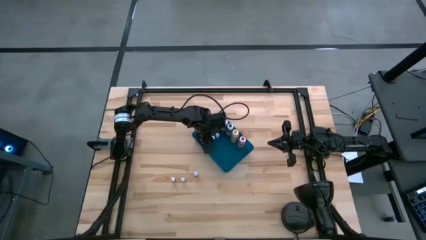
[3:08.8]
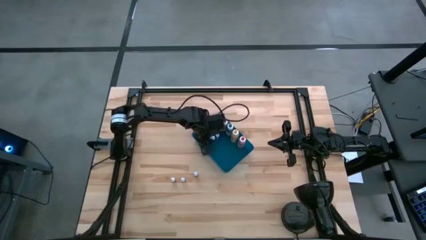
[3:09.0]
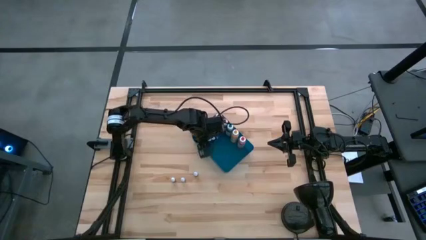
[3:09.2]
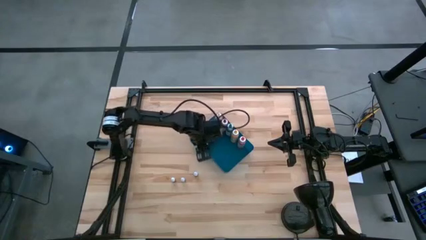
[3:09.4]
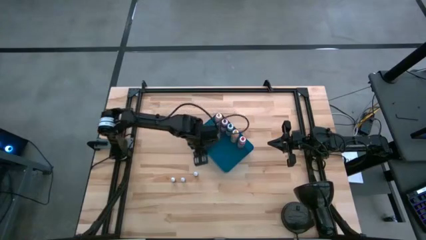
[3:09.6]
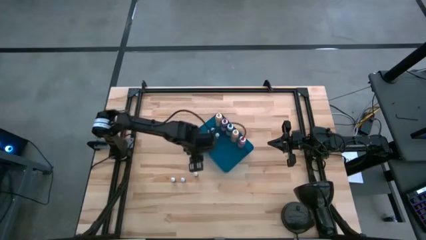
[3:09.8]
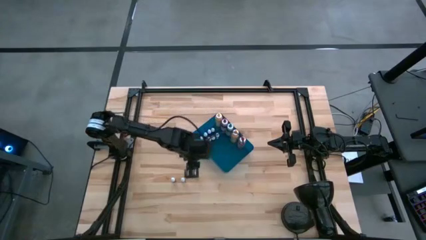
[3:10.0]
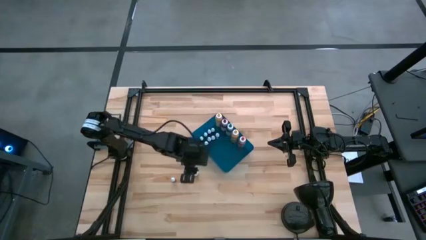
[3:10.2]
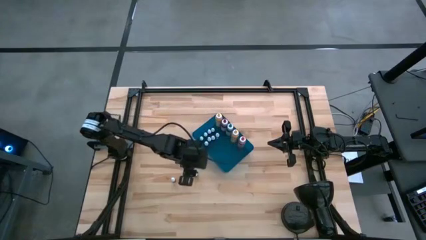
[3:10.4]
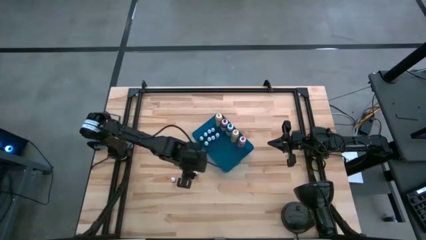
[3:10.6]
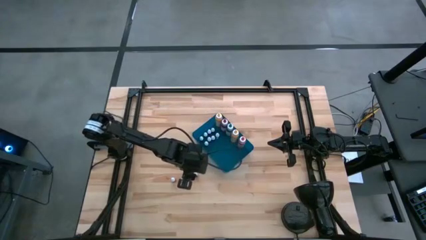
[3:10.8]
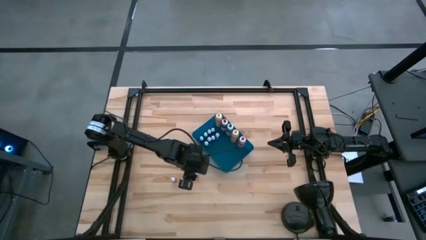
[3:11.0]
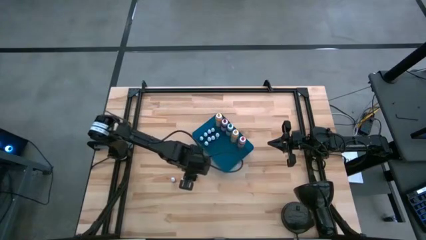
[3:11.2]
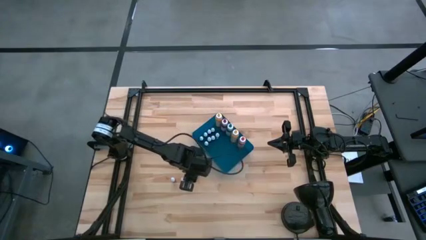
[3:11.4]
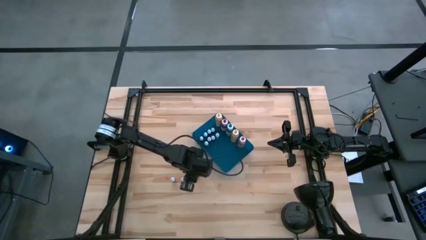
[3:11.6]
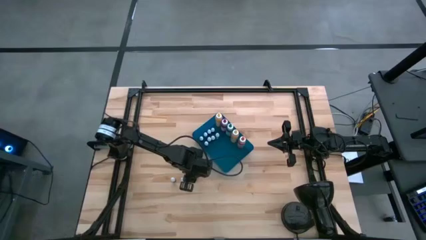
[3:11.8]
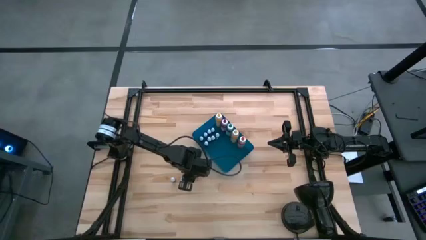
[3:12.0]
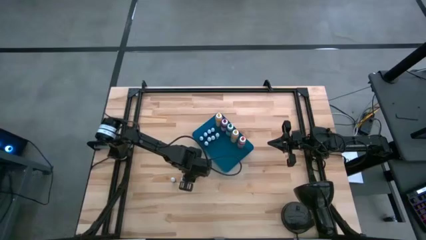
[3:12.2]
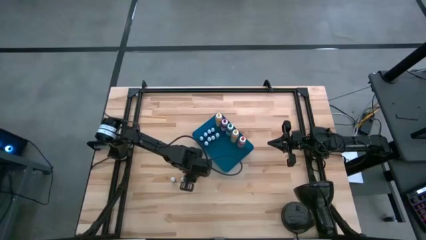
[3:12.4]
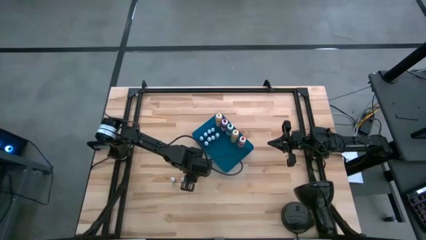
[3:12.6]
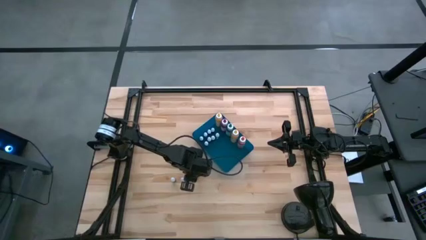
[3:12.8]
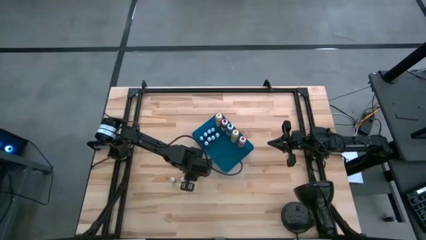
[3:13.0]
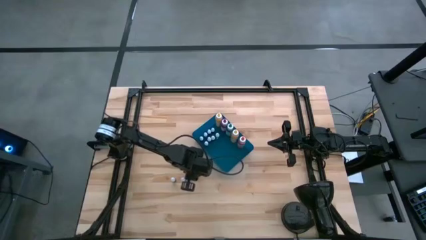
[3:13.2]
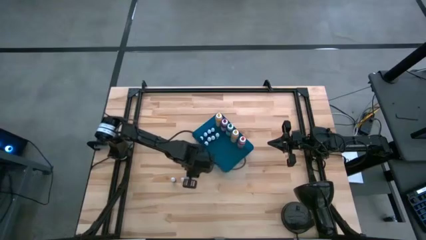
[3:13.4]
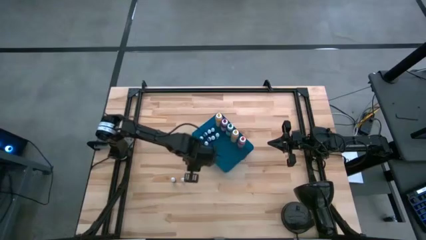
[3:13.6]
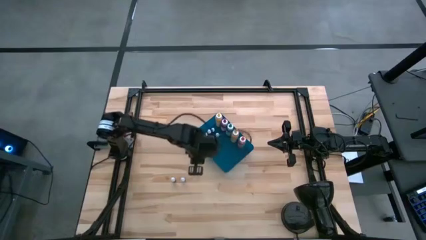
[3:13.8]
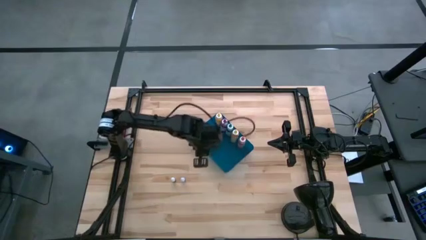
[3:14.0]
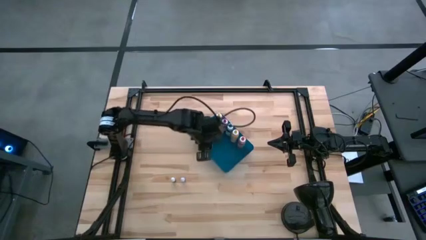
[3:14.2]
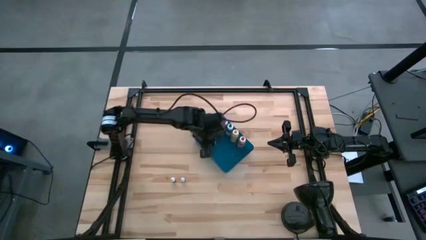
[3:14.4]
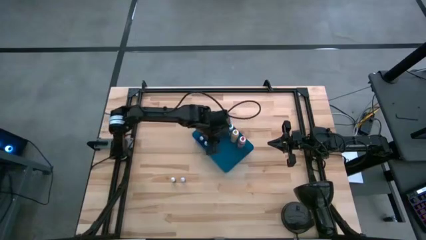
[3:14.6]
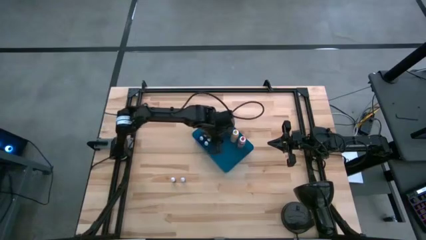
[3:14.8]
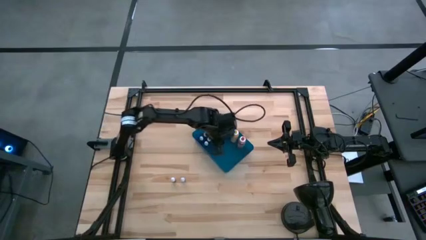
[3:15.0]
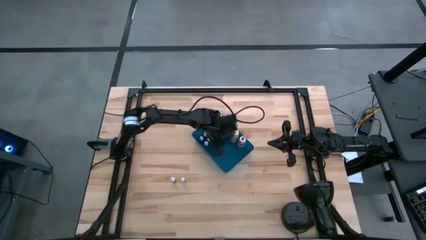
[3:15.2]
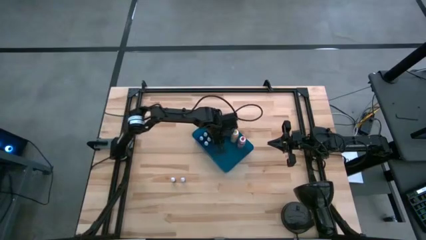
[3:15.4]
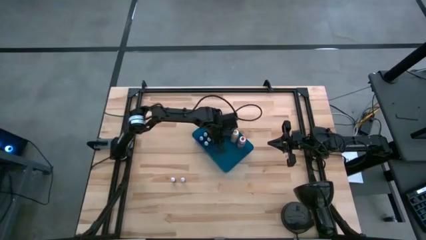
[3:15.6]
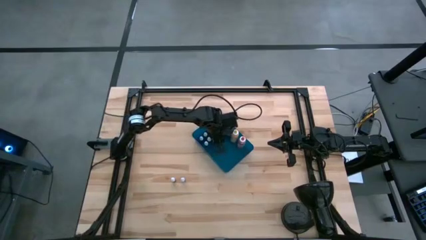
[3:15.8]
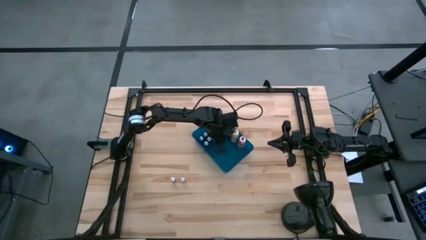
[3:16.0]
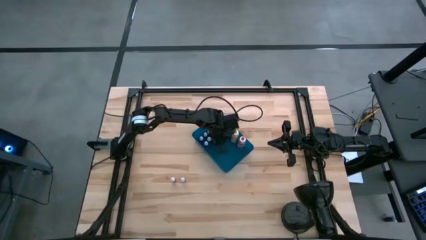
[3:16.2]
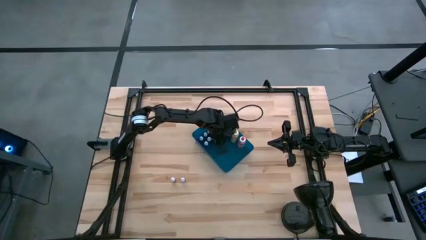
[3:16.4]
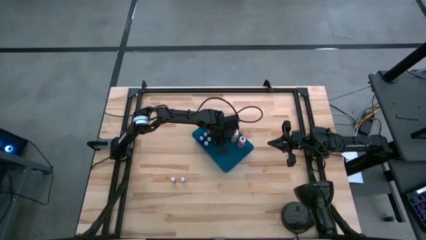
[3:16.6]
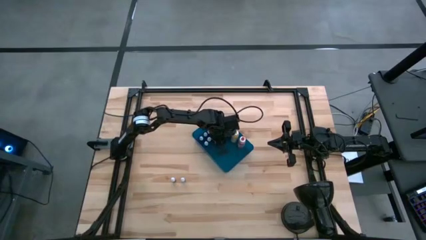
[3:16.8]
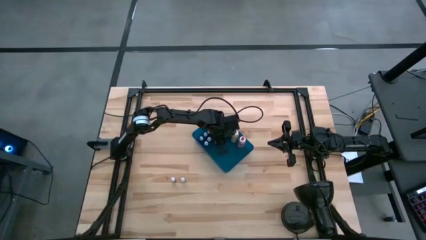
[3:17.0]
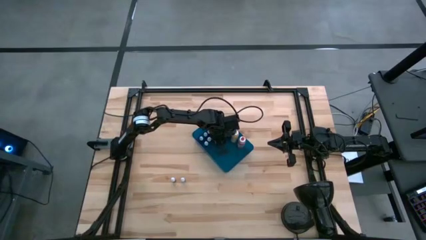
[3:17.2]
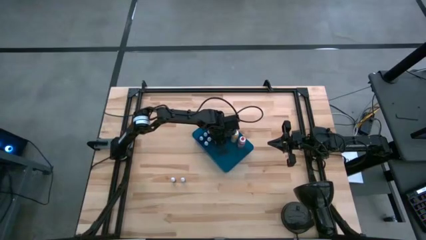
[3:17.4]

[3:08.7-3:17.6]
Task: Pick & Place food coloring
Put the blue food coloring bottle into the blue bin

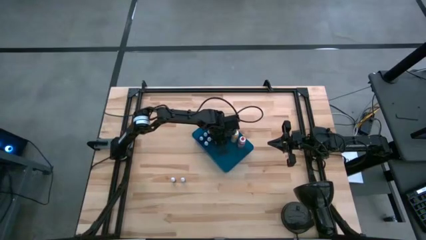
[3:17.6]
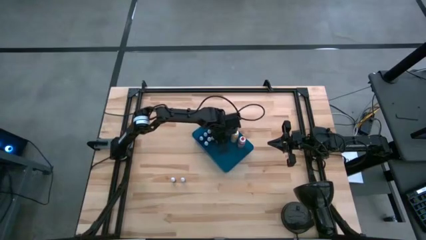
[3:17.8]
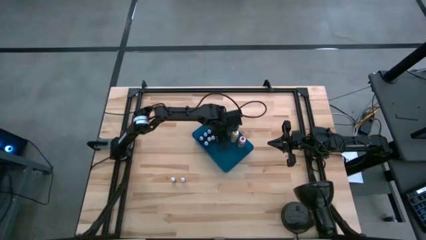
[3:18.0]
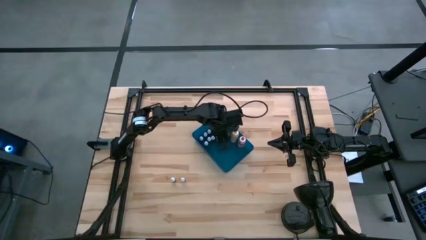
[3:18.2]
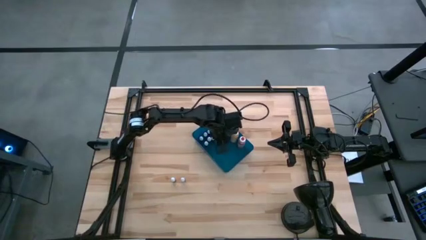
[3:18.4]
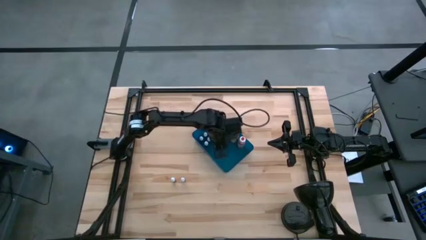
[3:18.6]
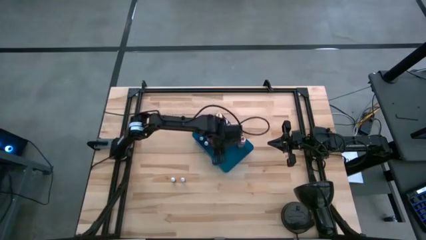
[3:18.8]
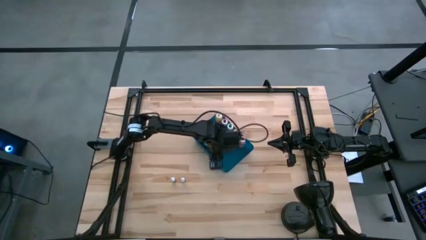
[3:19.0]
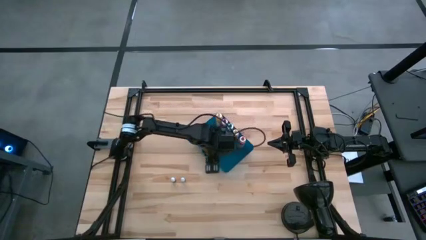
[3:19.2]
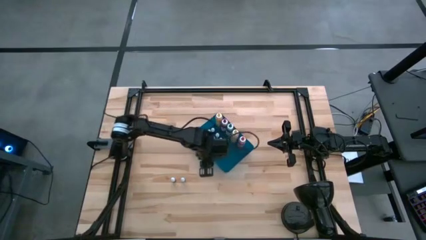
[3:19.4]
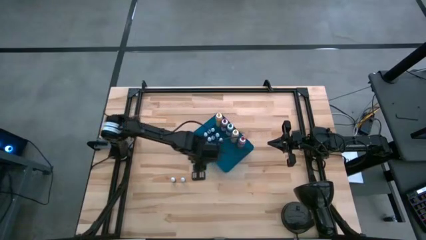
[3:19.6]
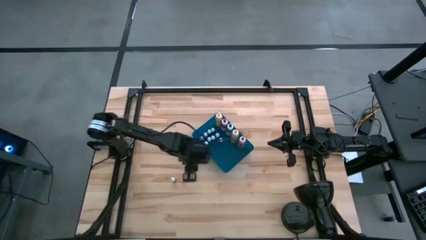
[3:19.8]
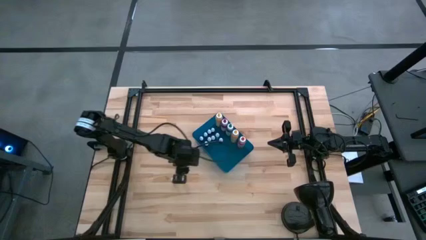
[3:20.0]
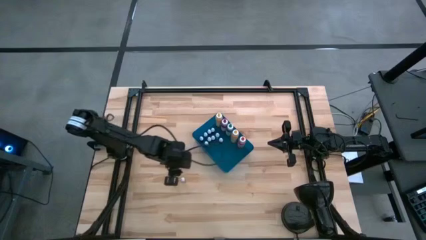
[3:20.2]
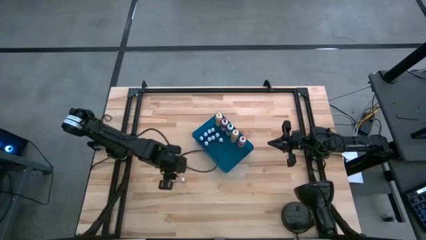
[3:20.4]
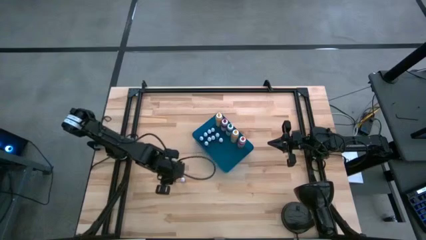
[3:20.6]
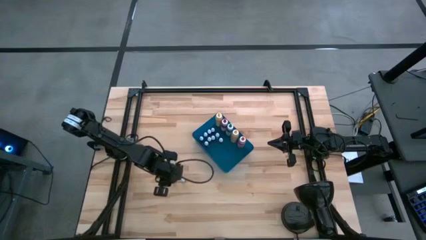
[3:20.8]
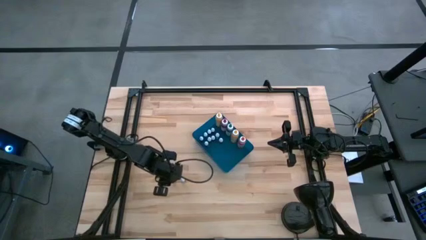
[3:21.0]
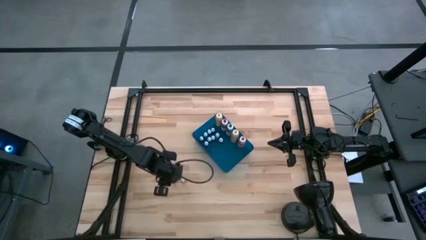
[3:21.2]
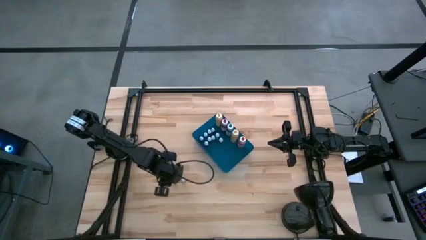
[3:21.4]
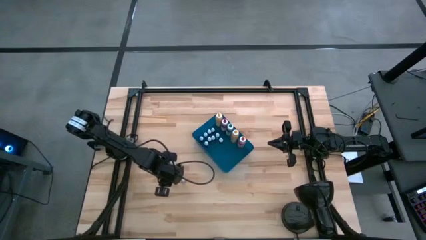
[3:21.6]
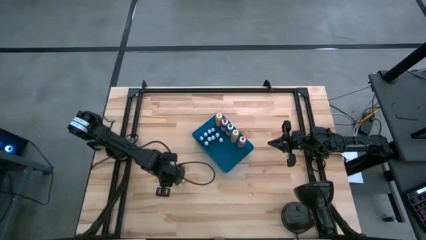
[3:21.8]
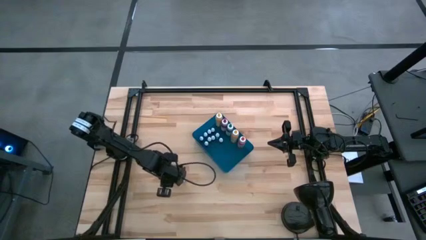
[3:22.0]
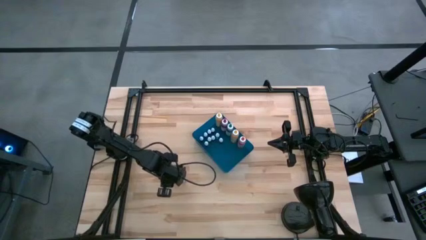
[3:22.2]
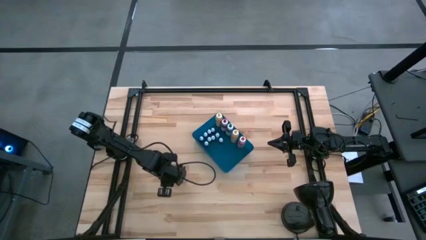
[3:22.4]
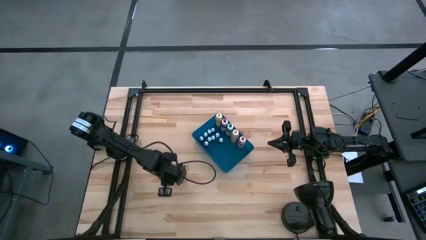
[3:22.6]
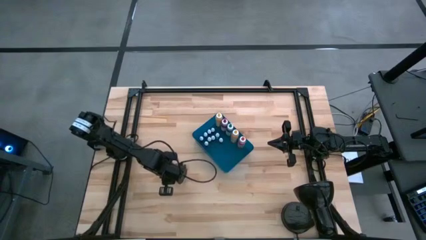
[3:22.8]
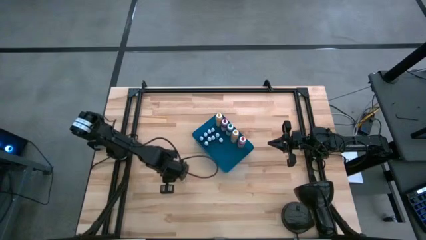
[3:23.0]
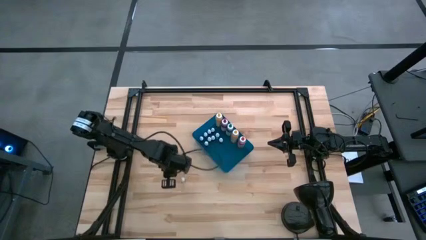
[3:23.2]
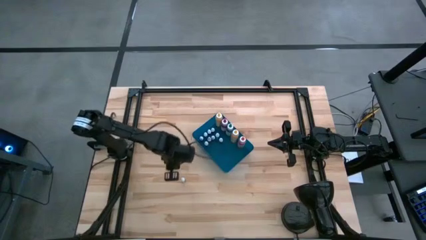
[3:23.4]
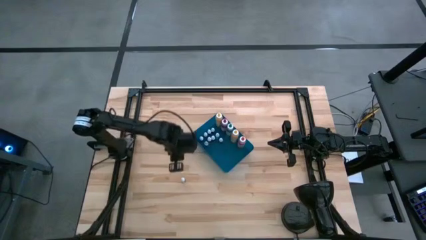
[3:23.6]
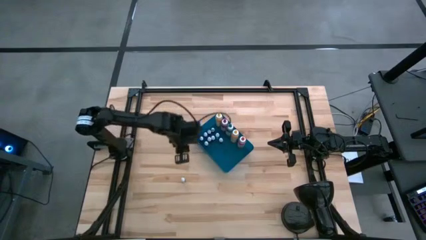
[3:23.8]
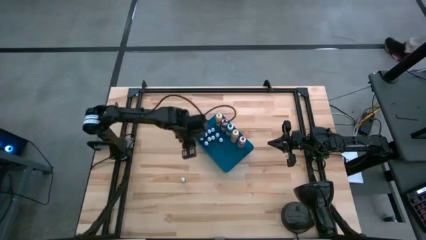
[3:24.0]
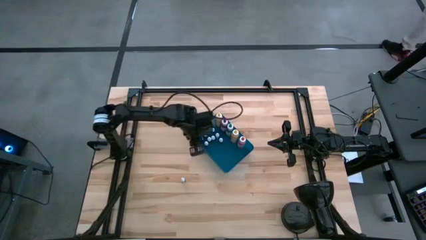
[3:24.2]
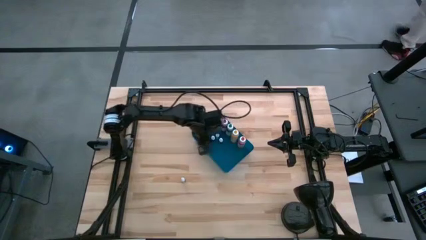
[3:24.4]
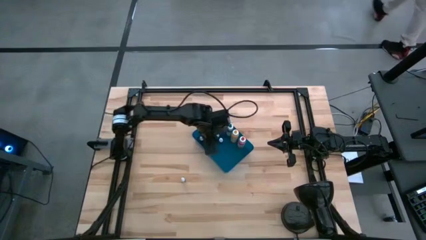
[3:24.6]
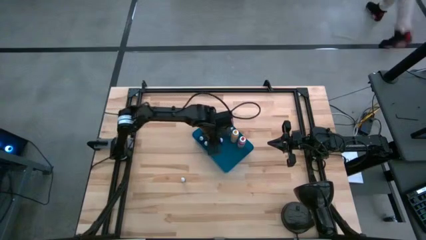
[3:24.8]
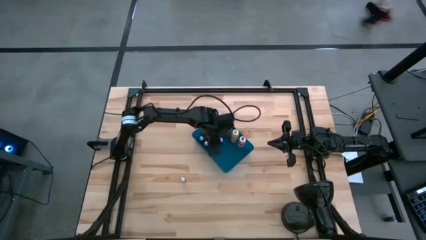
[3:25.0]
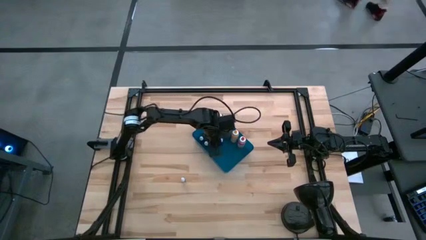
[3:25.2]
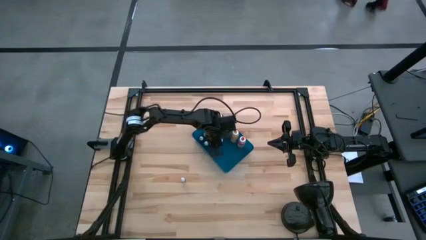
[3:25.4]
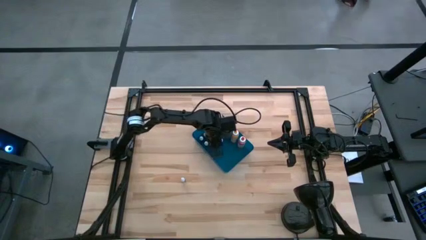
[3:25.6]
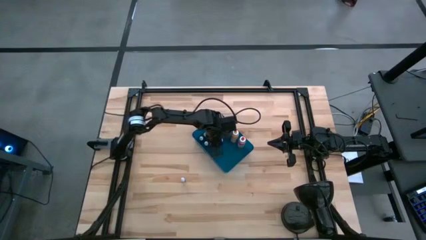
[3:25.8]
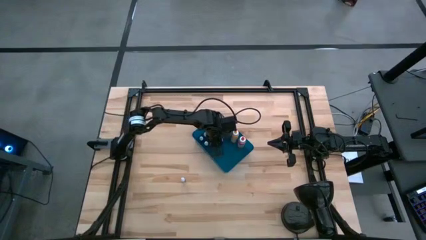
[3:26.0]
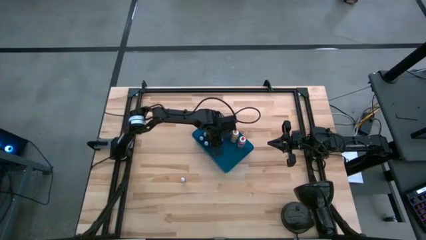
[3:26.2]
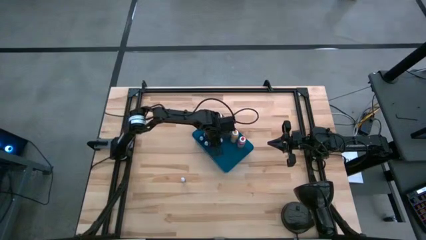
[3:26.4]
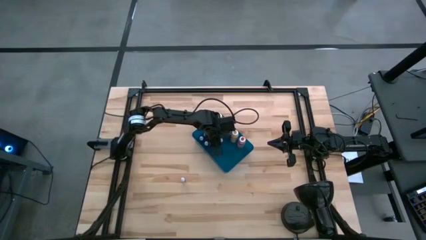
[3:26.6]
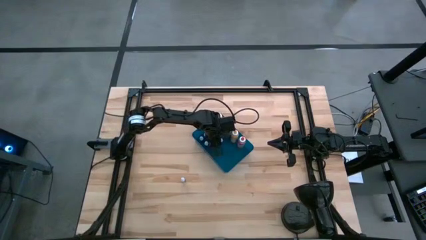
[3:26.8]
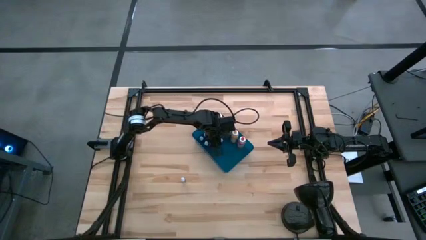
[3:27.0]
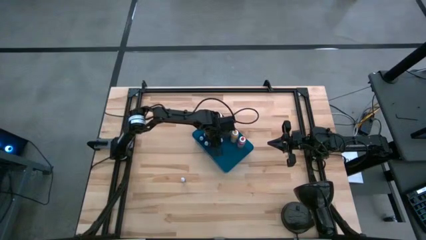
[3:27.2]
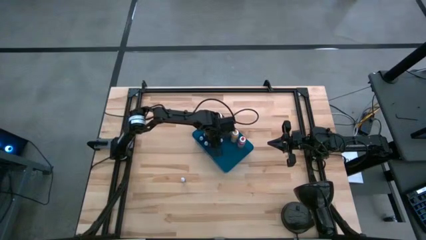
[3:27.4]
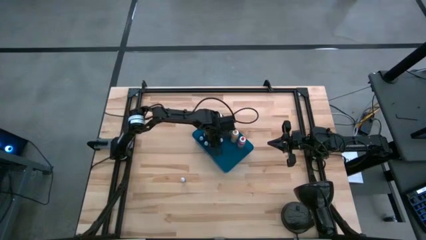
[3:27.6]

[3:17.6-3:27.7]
Put the orange food coloring bottle into the blue bin
